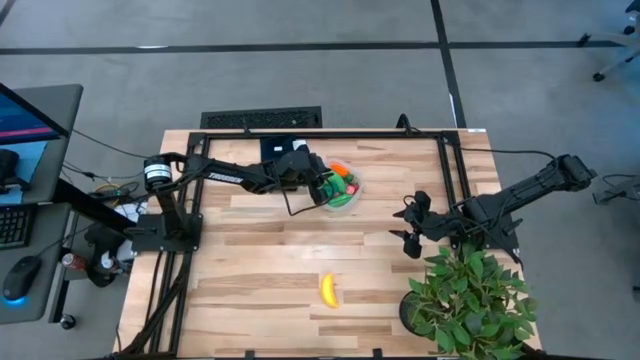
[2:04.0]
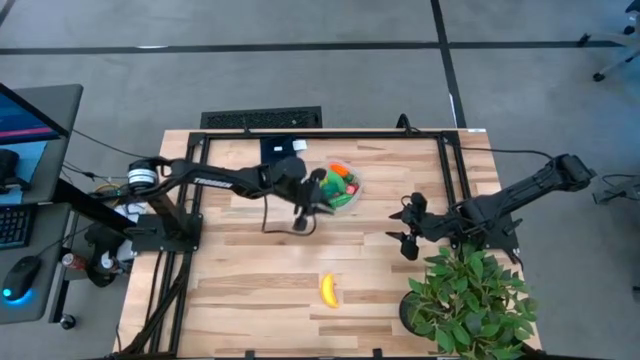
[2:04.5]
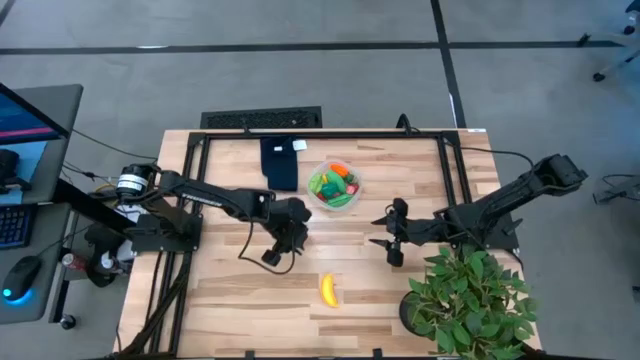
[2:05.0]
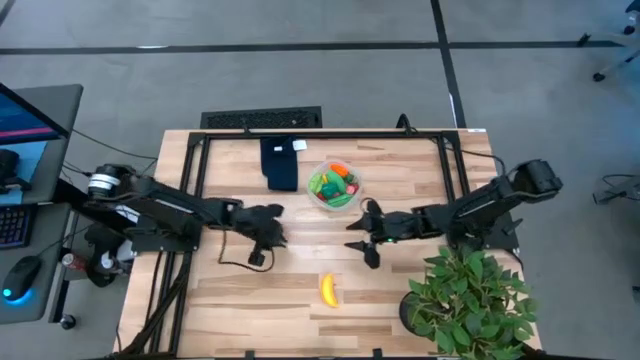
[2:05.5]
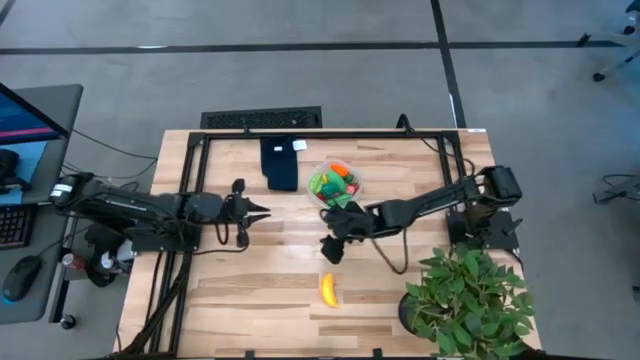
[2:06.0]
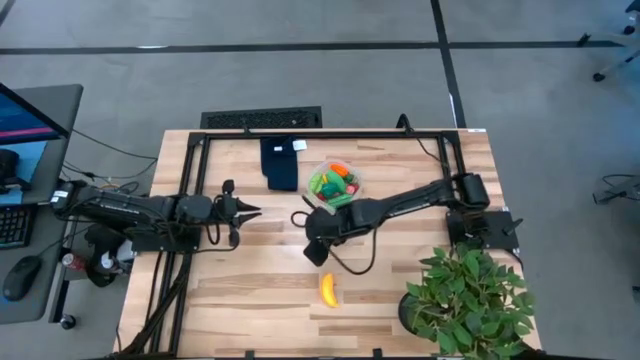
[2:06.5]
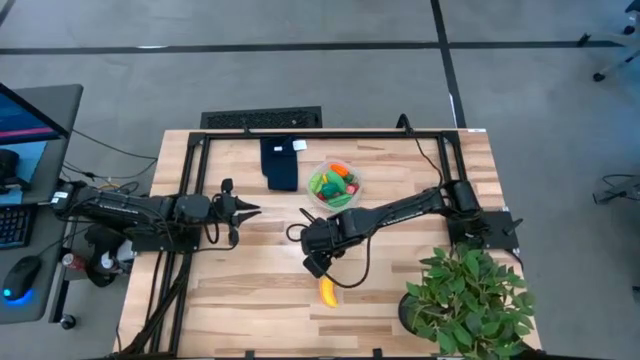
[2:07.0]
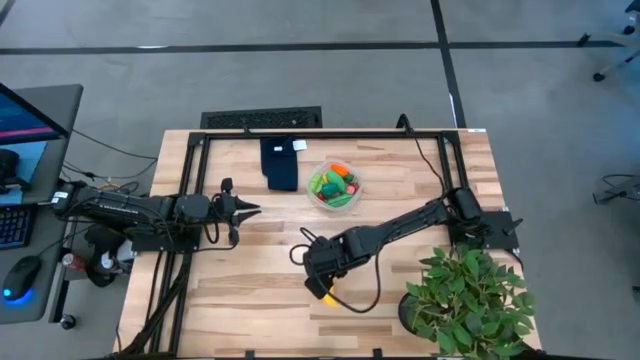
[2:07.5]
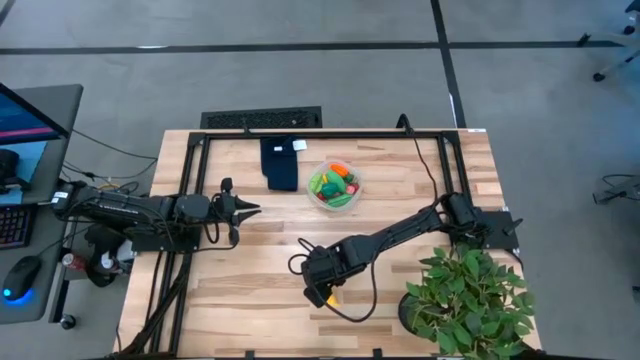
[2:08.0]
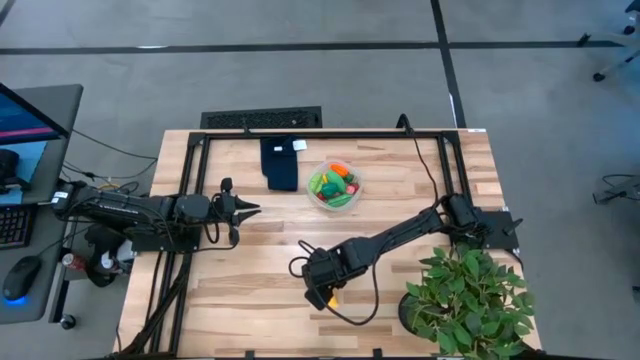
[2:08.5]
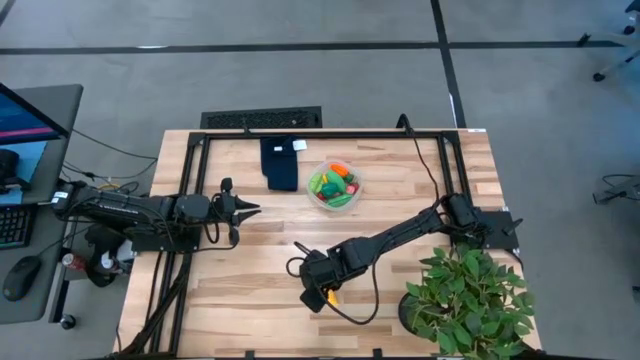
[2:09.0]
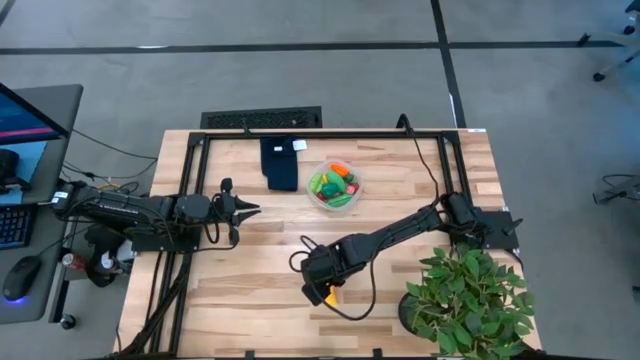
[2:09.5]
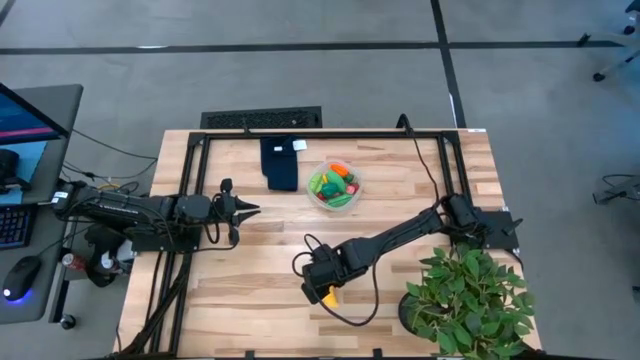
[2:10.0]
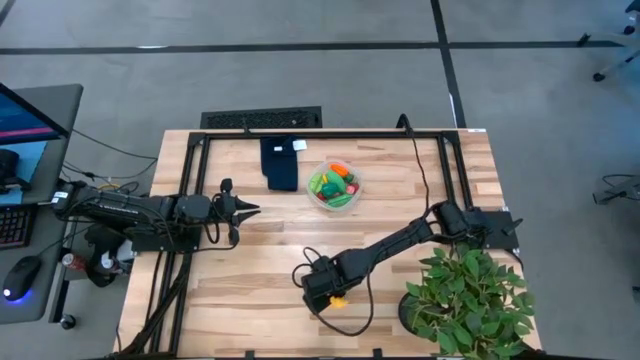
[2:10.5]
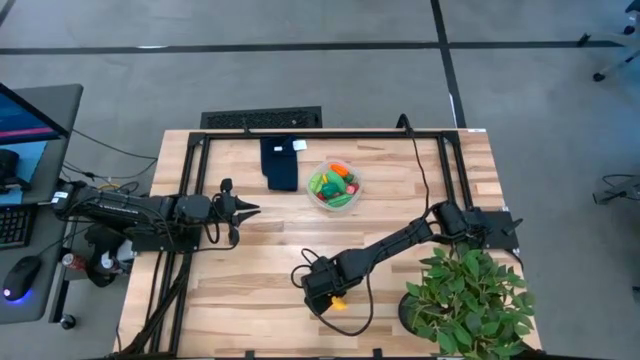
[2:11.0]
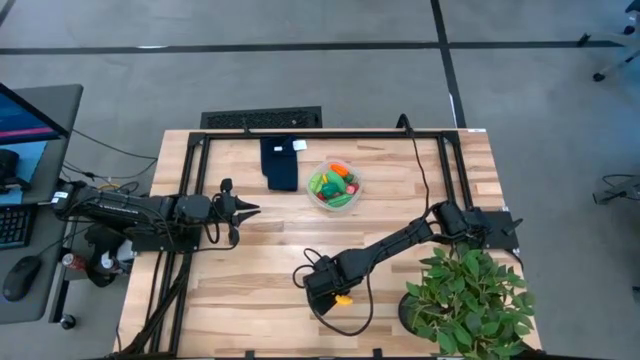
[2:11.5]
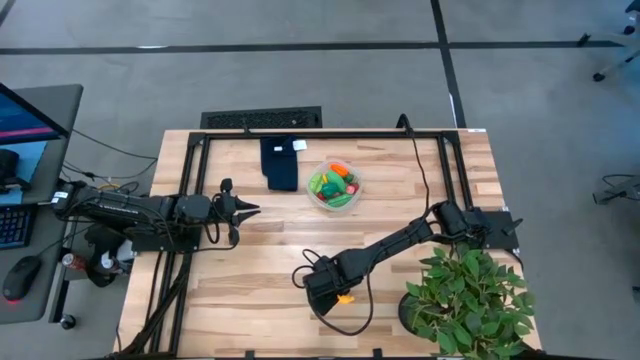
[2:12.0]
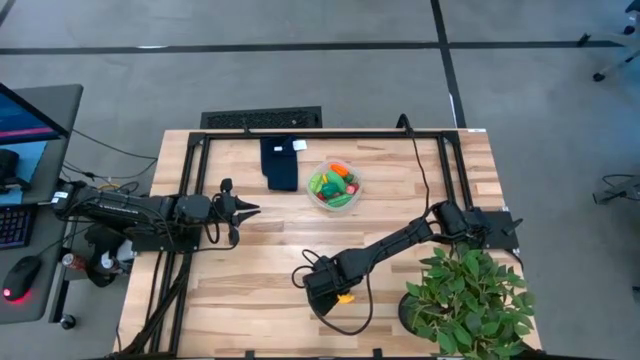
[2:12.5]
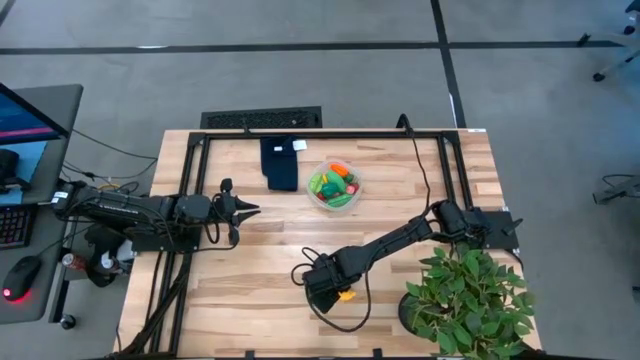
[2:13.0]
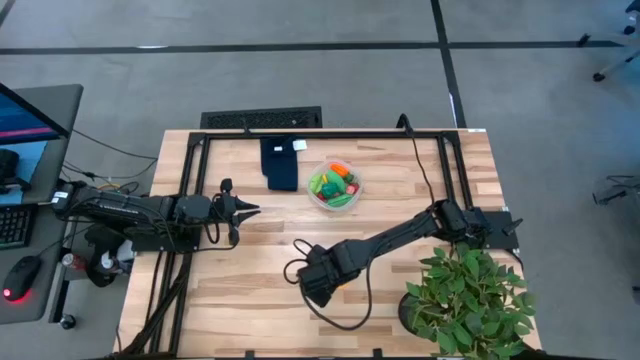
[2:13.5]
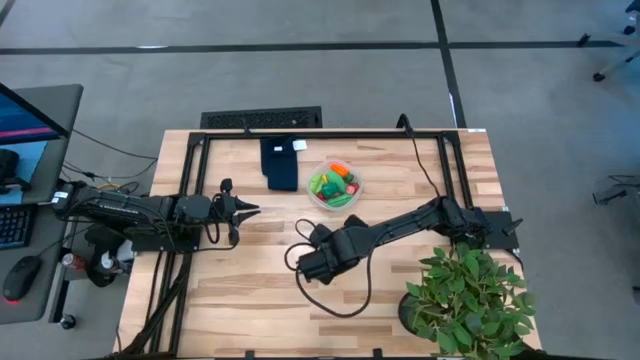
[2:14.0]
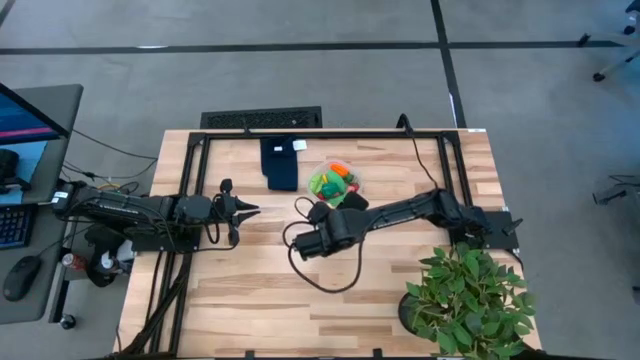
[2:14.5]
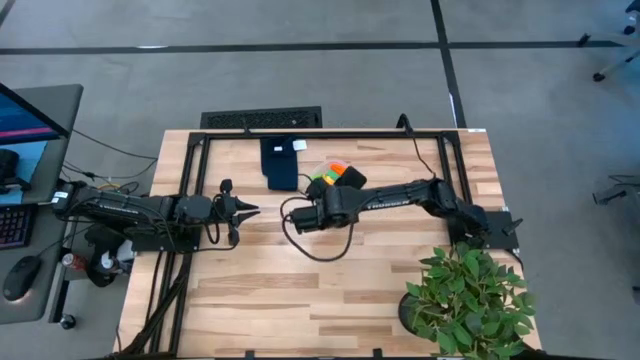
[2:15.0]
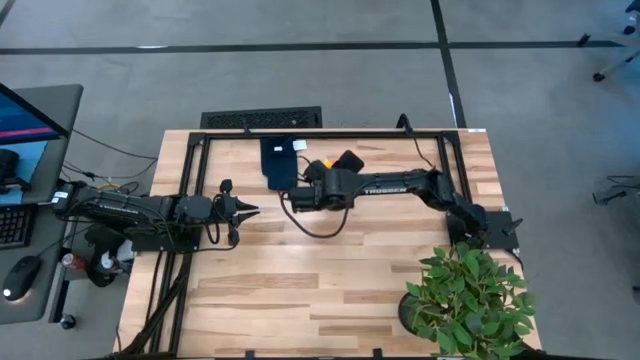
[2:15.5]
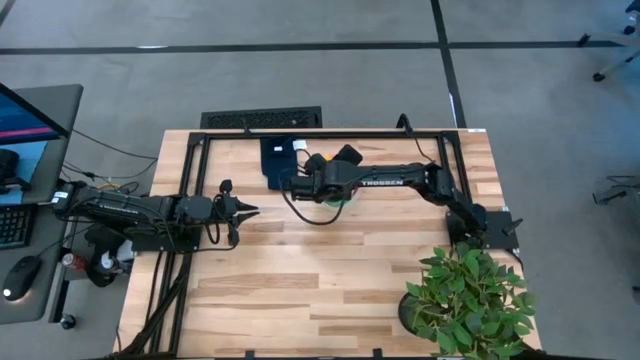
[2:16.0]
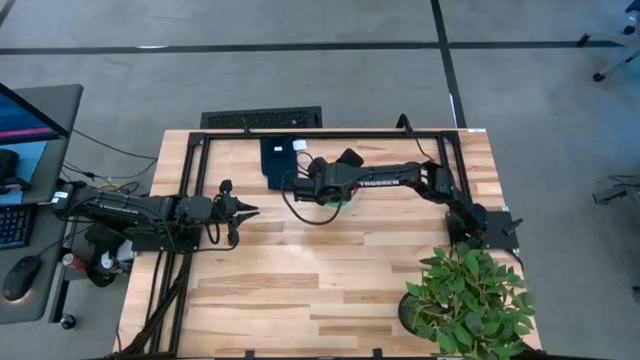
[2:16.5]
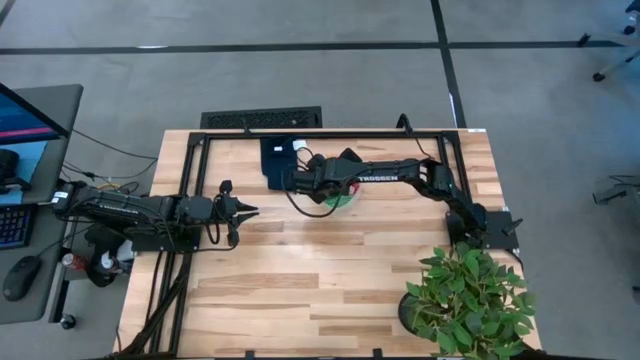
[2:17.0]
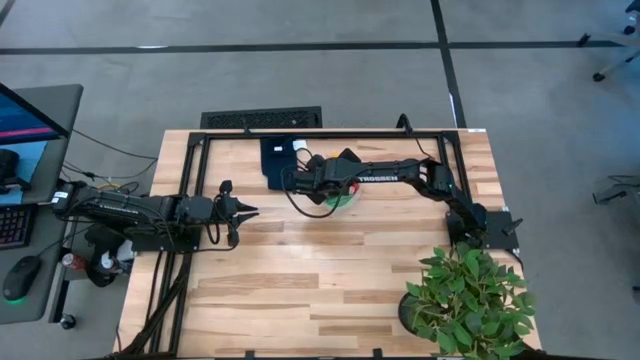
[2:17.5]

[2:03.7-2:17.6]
Task: Pick and placing Produce into tupperware
Put the yellow banana into the transparent container

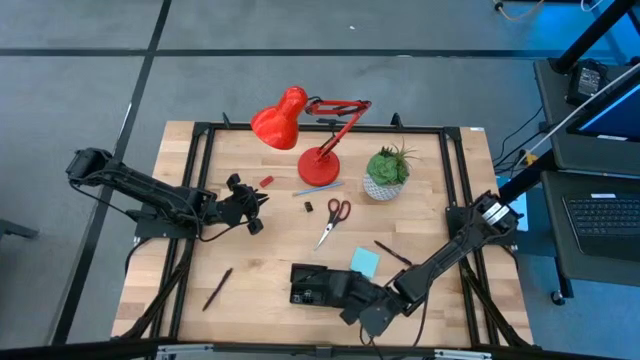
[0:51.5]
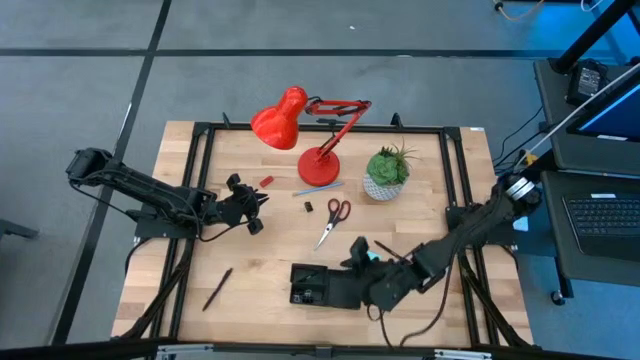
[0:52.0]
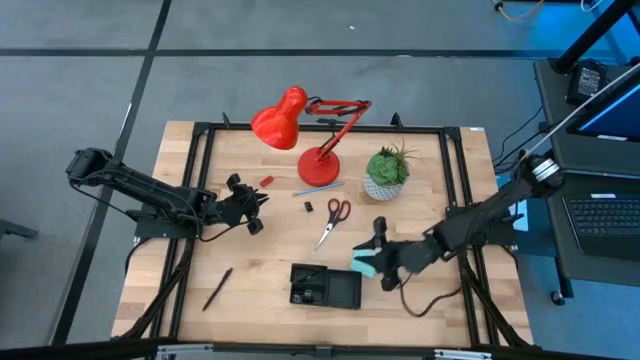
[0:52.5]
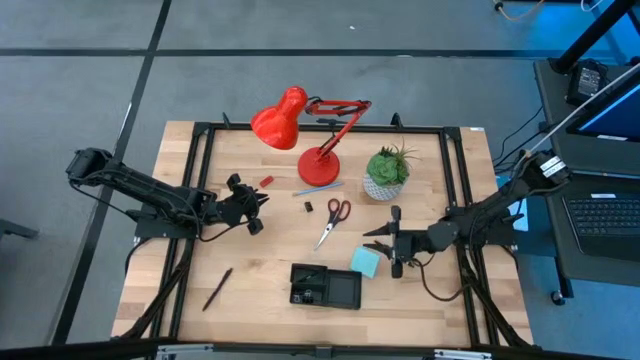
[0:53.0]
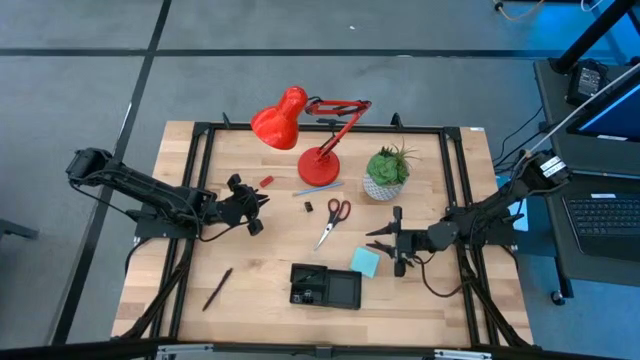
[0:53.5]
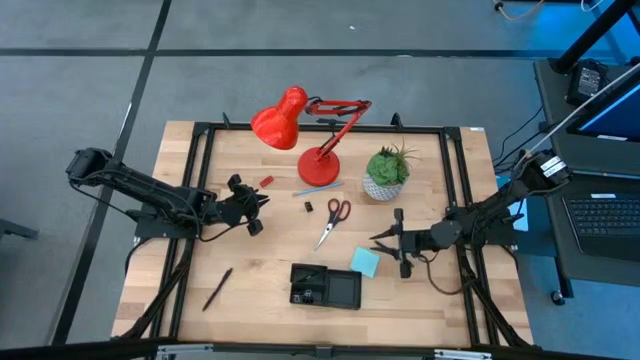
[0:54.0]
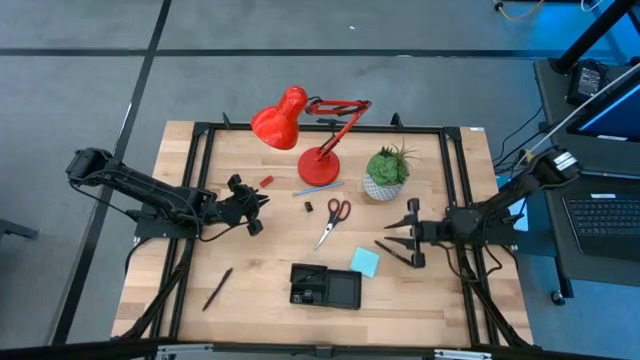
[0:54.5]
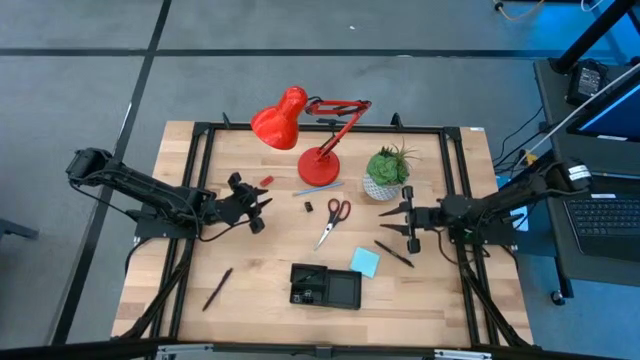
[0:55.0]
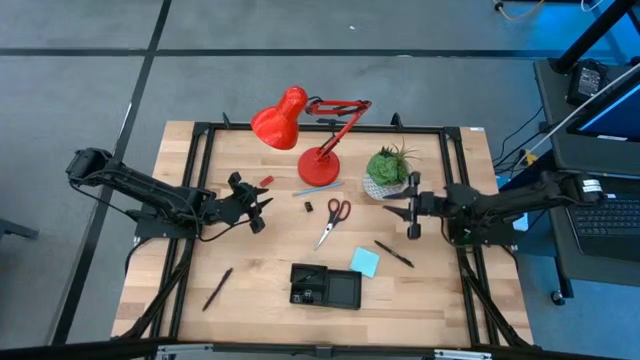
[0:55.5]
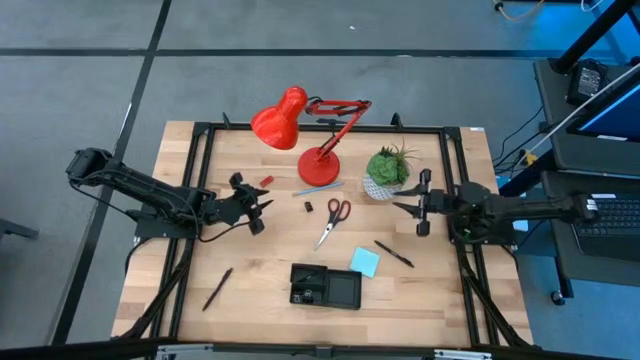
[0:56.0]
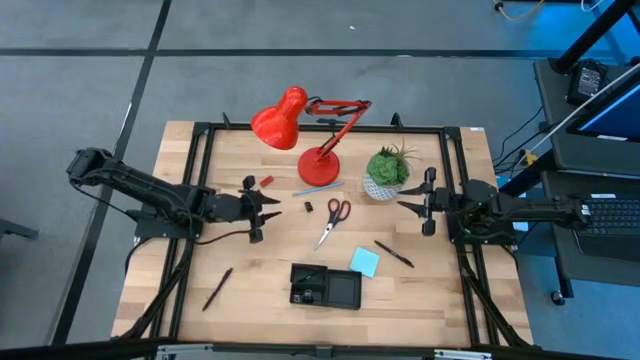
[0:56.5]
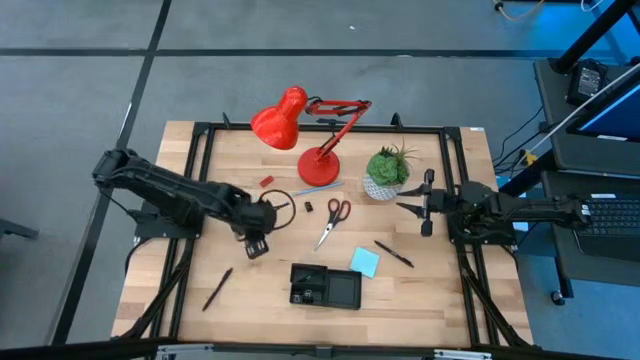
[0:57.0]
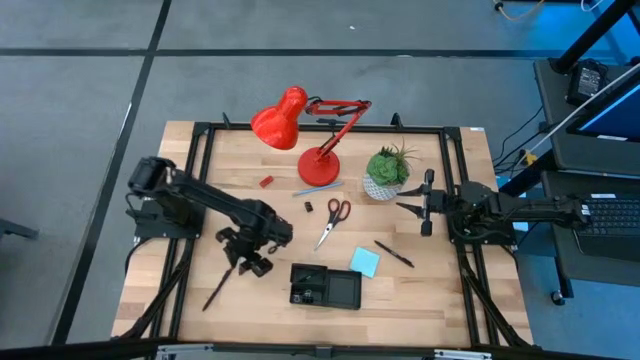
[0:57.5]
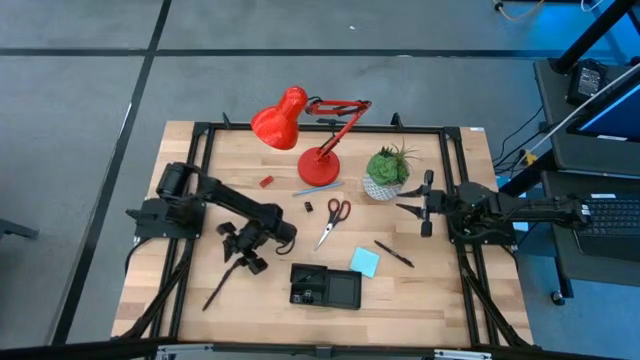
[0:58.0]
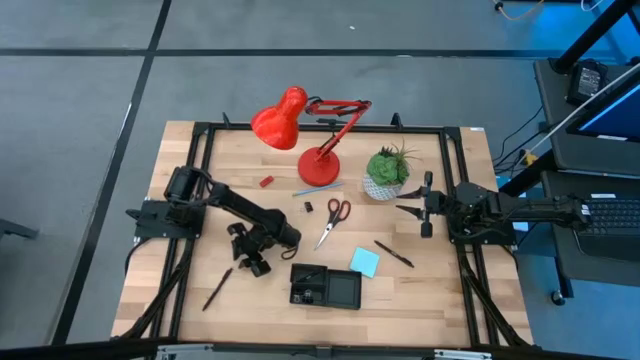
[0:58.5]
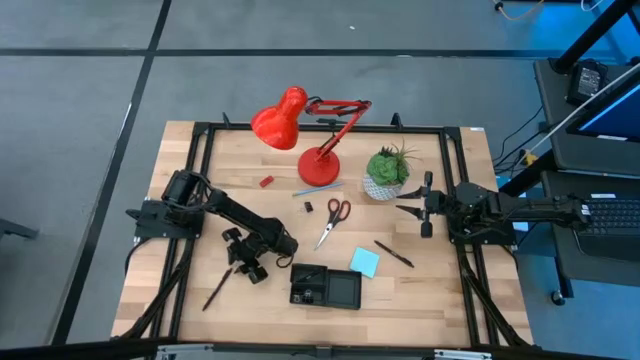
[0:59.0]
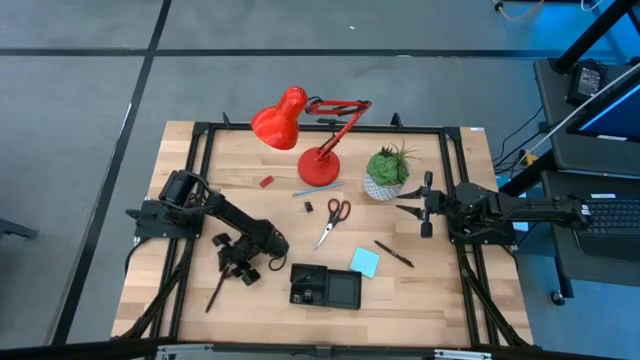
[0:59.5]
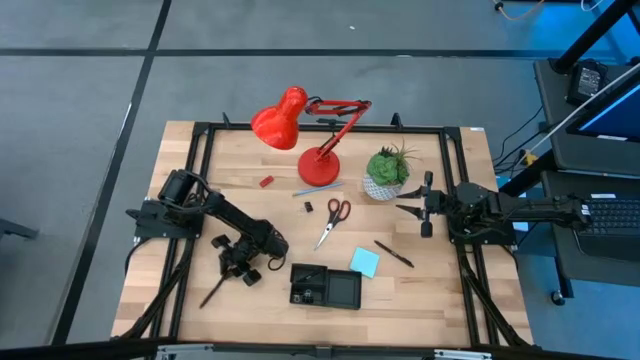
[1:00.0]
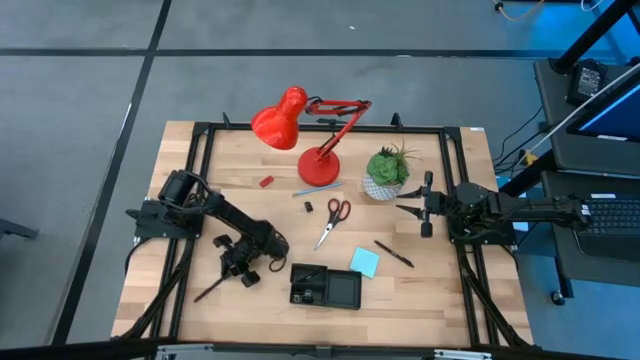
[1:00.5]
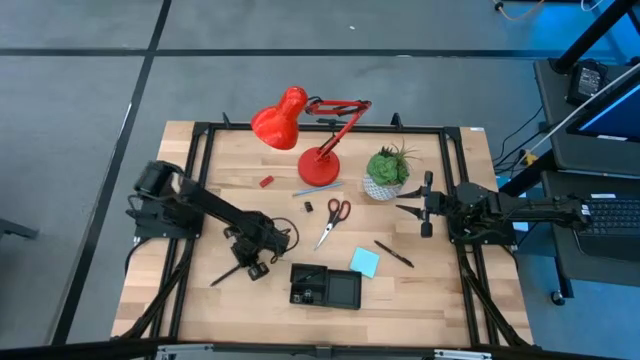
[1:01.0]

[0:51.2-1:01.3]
Task: Pick and place office supplies into organizer
Put the bottom black pen into the black desk organizer
